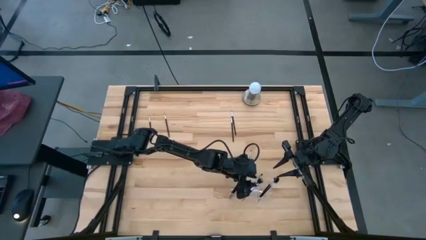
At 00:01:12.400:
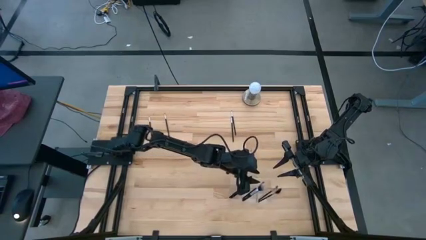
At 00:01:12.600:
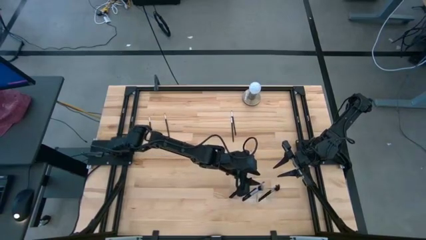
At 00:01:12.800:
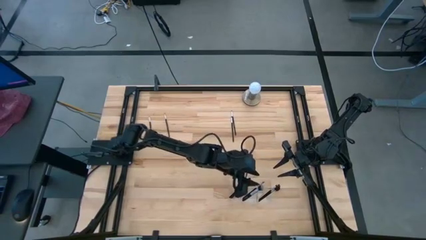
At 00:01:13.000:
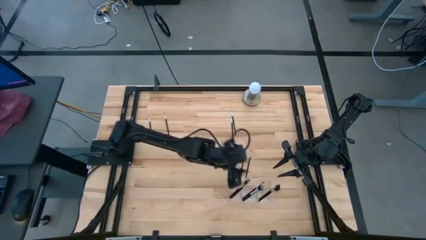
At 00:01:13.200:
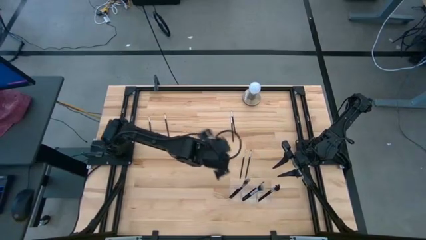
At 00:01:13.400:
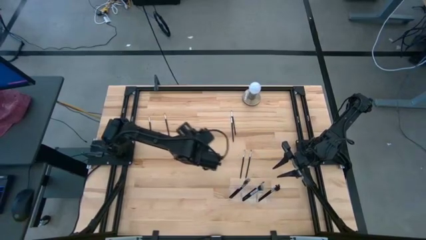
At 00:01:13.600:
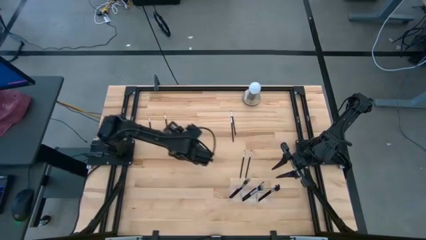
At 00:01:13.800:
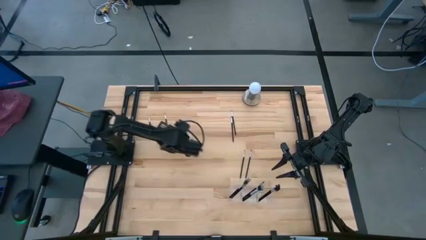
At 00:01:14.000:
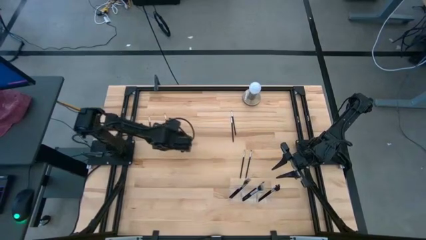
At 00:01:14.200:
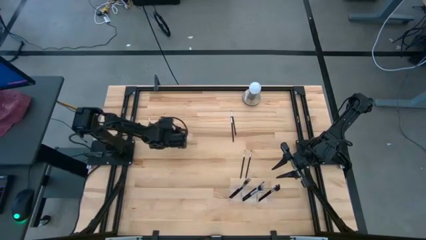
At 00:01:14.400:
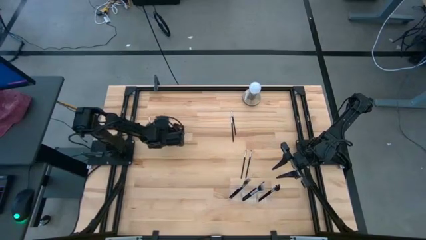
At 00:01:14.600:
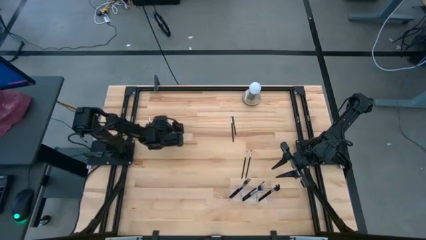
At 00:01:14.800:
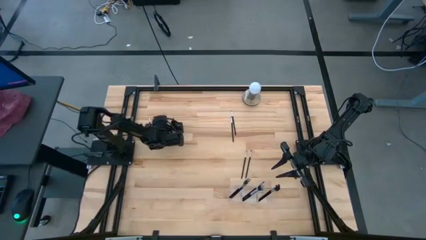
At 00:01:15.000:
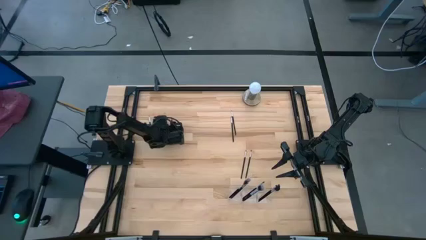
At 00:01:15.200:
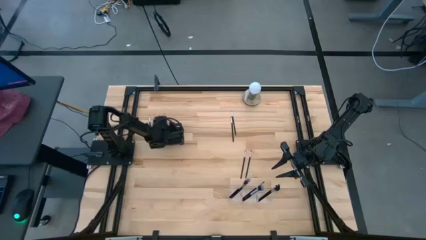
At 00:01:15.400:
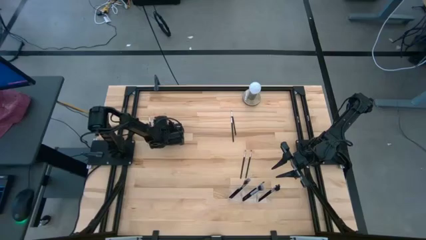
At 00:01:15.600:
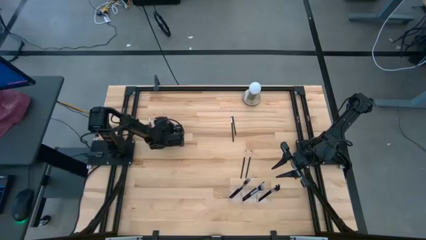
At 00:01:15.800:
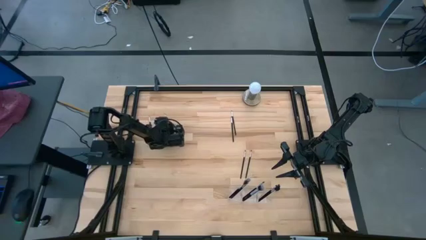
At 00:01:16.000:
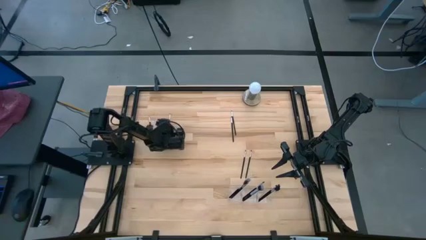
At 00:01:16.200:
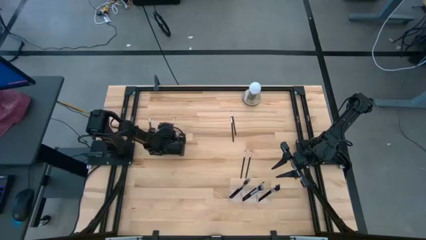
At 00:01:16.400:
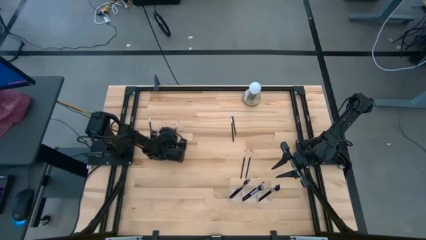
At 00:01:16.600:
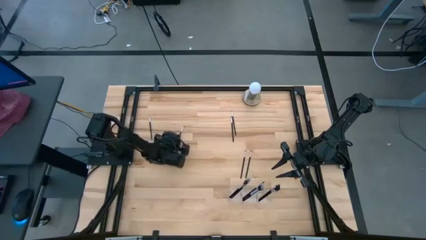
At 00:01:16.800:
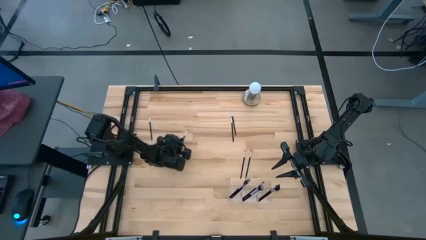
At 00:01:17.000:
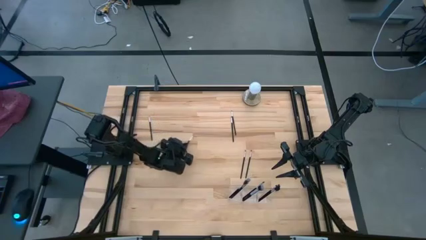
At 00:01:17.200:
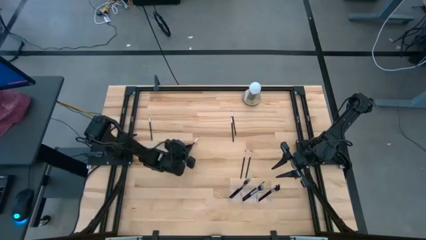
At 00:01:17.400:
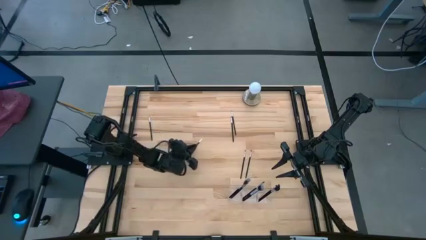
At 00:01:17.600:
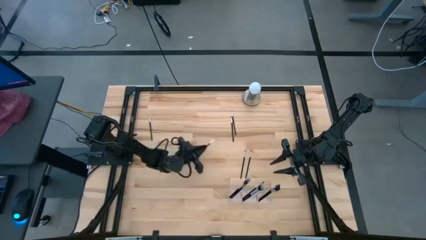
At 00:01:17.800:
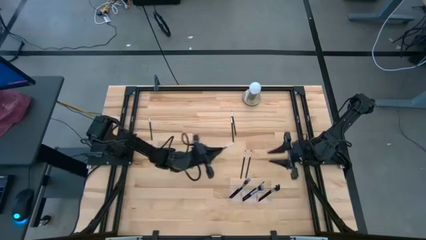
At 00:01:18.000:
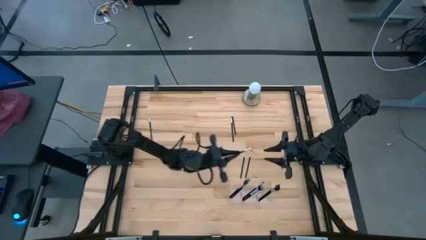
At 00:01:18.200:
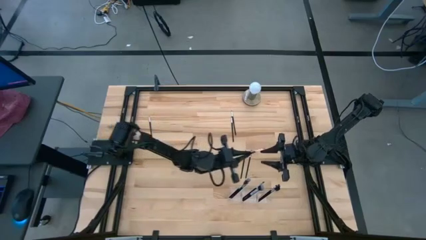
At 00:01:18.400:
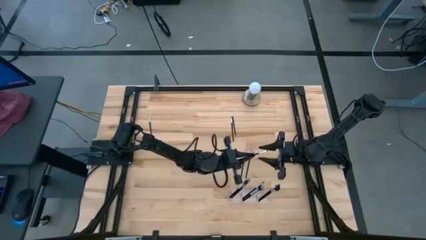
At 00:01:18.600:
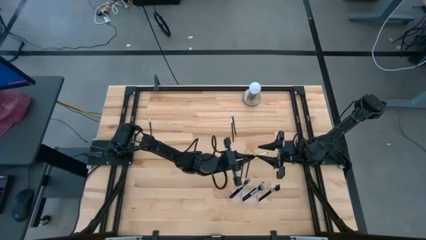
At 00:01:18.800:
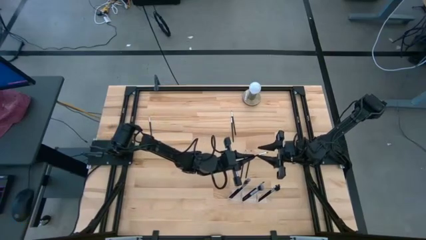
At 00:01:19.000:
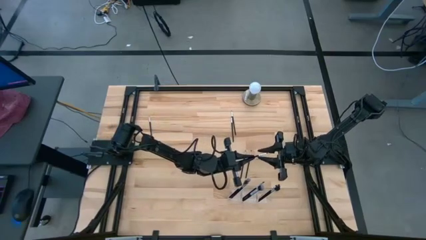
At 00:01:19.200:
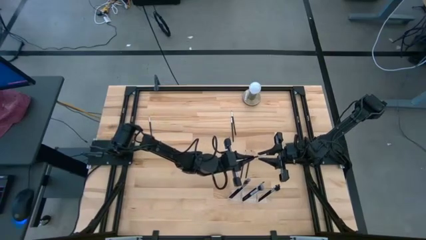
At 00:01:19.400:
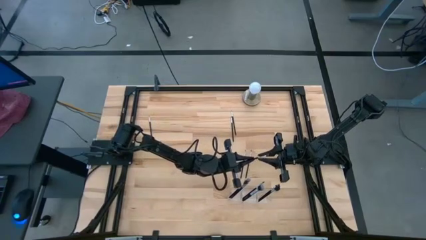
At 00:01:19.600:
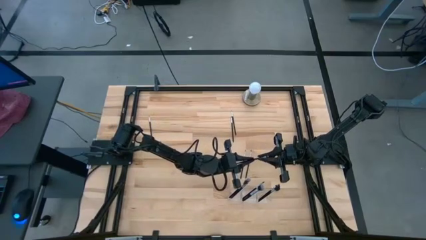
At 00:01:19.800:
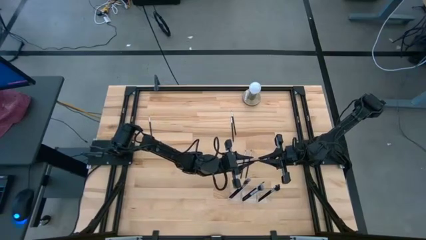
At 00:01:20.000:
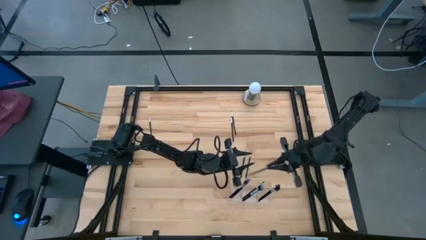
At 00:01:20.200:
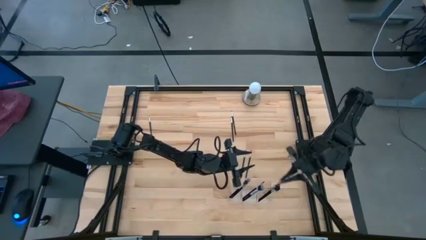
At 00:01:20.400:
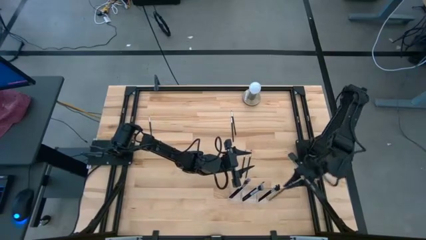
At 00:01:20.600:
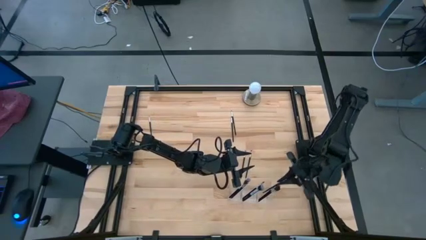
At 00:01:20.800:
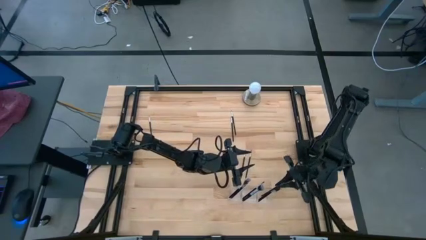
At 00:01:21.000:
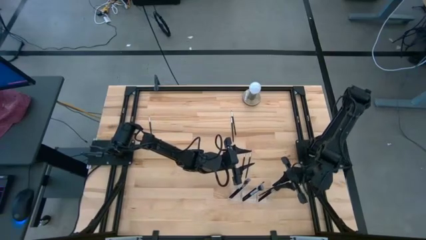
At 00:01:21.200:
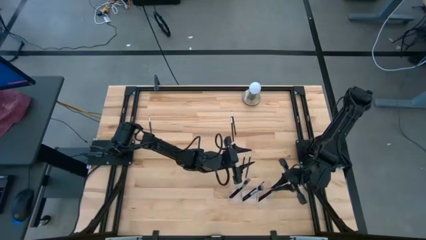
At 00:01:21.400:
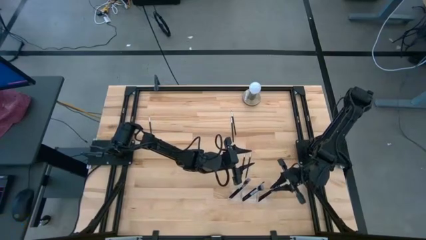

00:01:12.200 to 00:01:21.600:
Task: Put items in baskets/containers
Put the eyeshadow brush into the right section of the transparent organizer

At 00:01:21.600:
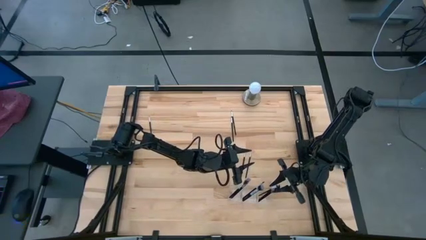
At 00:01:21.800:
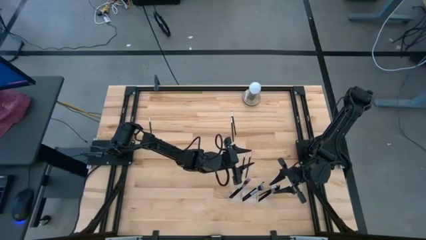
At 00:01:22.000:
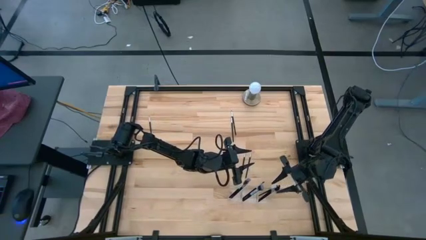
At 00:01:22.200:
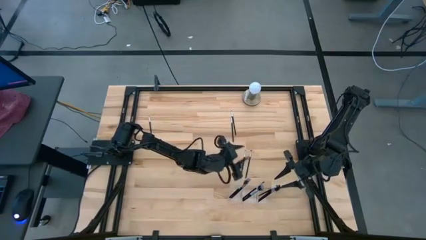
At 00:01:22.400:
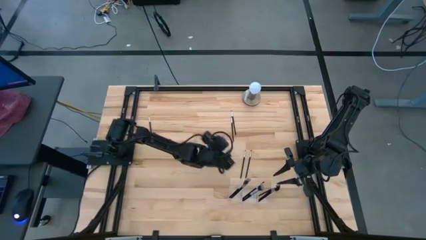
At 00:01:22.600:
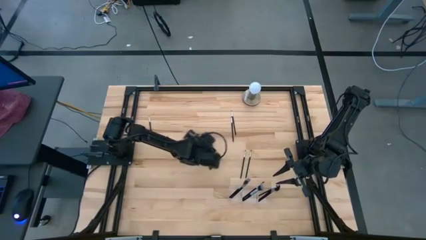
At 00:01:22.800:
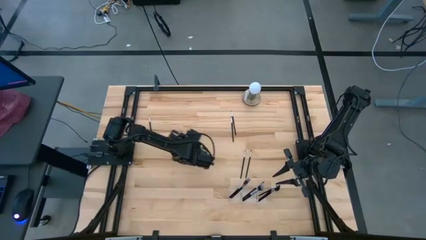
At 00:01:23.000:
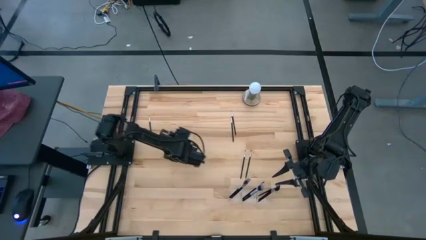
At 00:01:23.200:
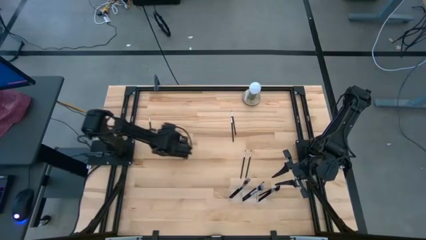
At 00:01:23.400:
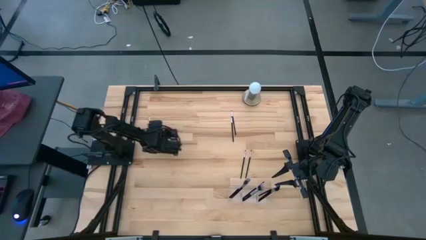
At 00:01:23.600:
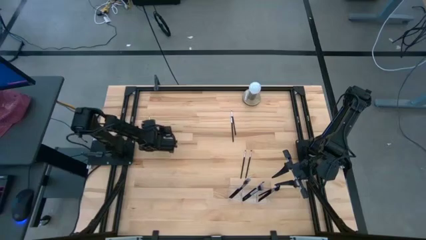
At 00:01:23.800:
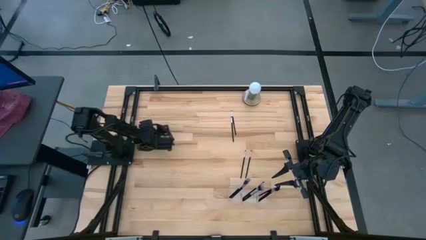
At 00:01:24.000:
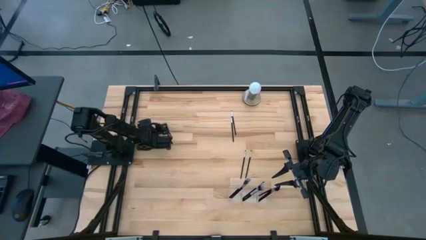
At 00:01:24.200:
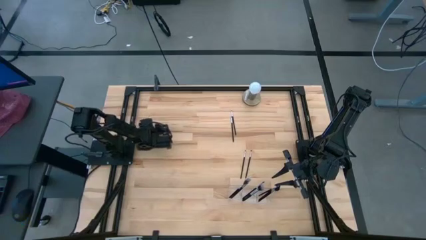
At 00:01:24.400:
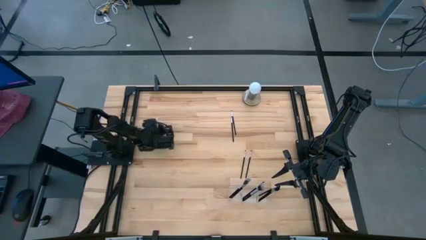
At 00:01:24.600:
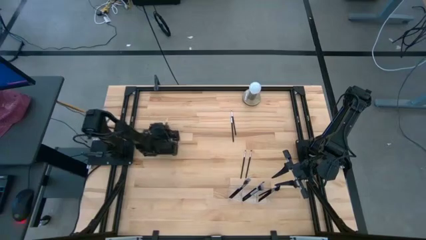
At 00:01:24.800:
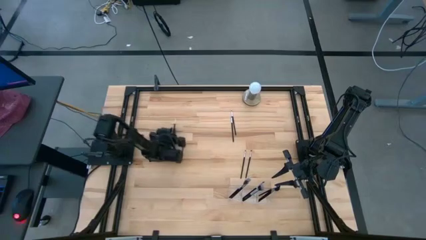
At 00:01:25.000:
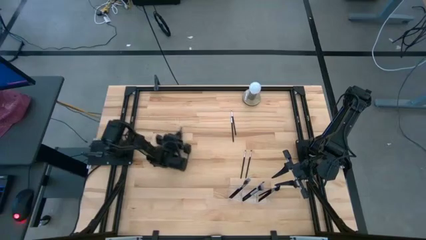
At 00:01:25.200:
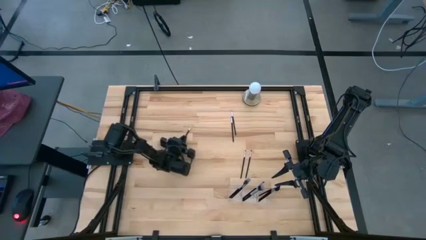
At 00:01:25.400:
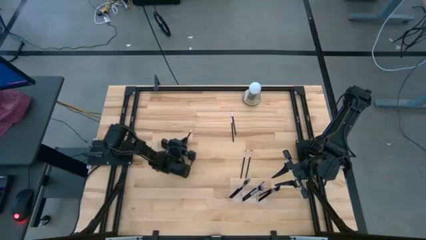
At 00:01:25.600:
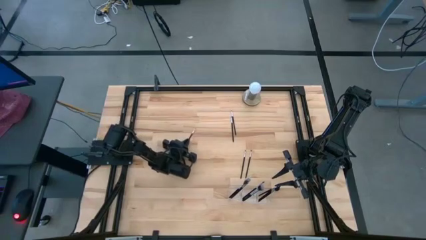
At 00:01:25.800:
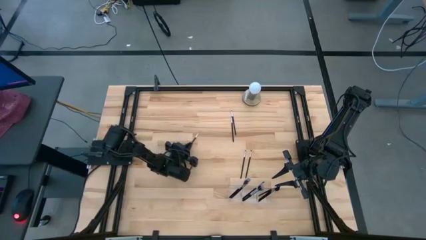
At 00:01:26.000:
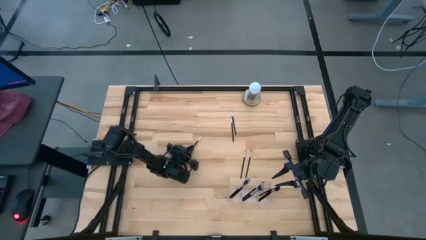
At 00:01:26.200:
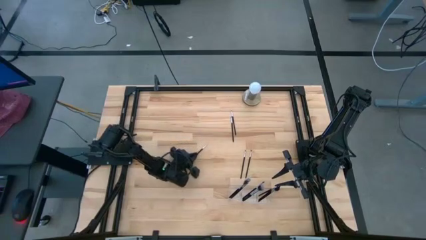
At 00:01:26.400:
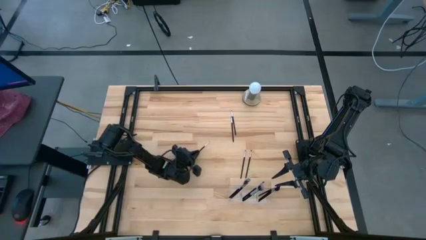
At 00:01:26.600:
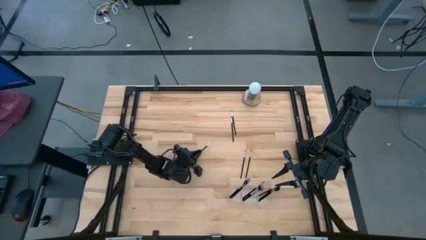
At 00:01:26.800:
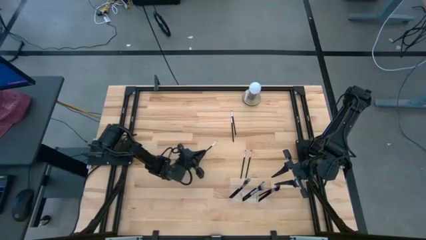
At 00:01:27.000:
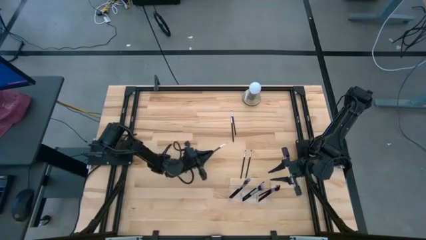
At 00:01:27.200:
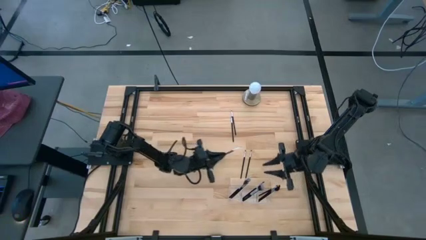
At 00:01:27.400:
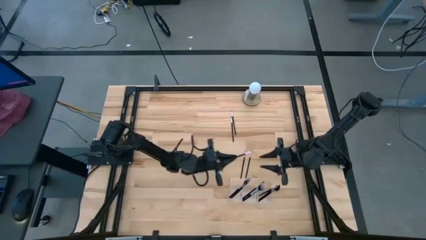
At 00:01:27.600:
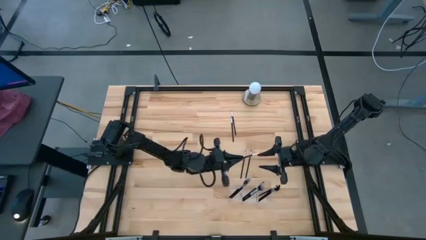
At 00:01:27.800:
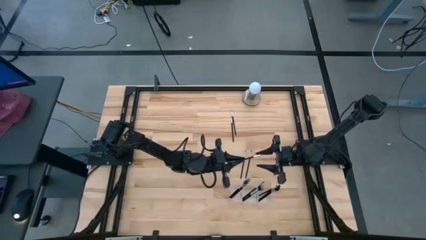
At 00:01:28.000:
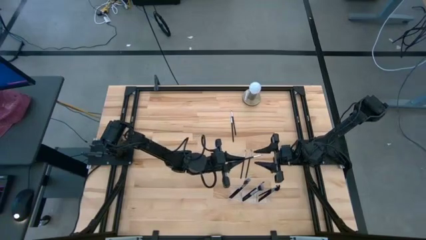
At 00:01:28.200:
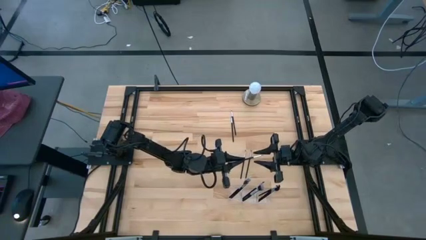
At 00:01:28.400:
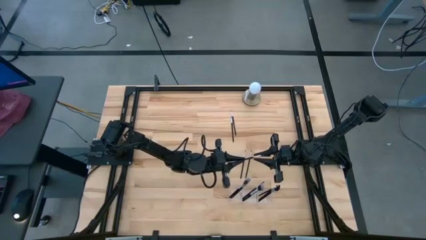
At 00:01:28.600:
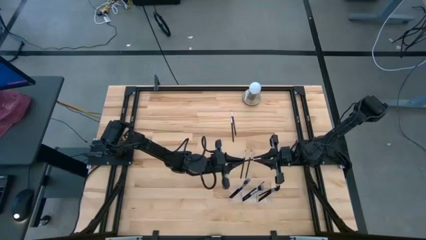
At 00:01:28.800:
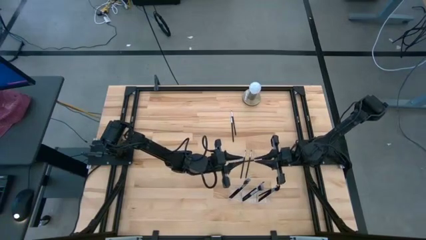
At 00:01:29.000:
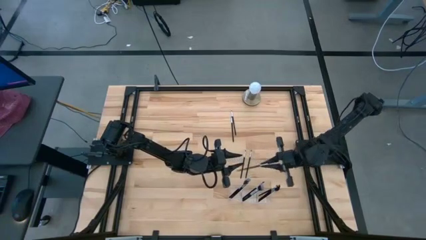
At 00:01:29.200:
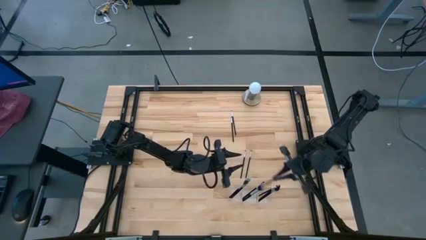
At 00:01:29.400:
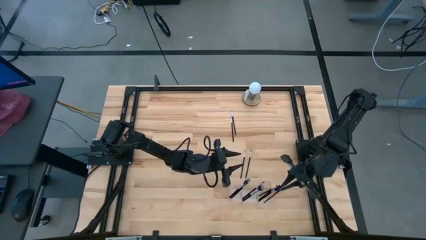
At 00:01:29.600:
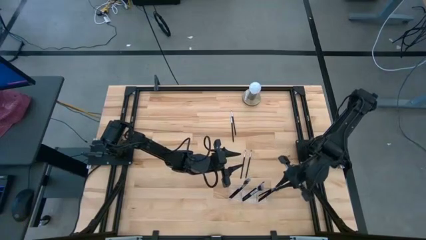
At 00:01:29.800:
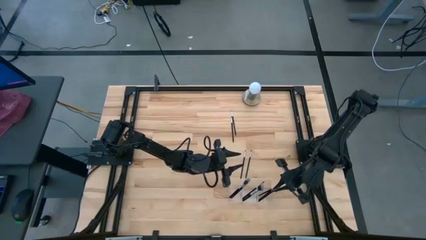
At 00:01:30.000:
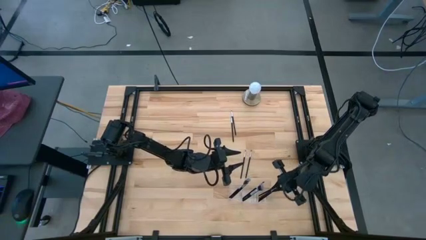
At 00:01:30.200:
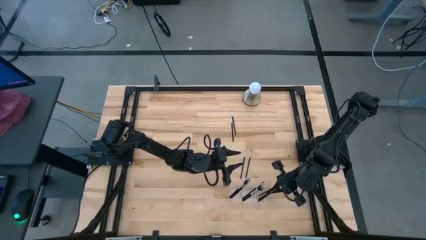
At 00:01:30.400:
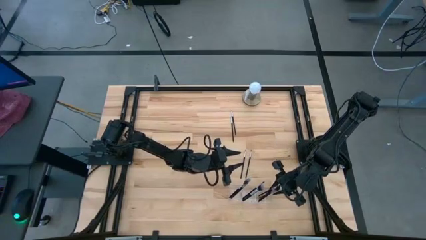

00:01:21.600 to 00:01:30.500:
Put the liner brush into the right section of the transparent organizer
